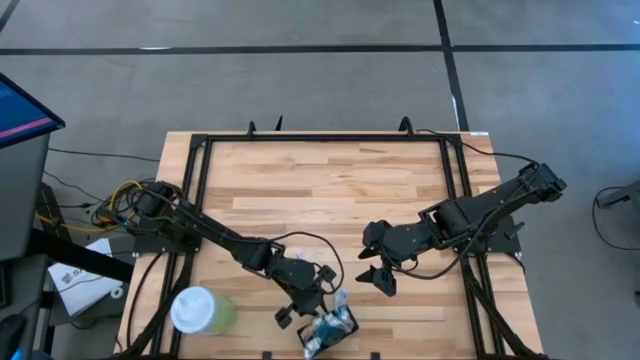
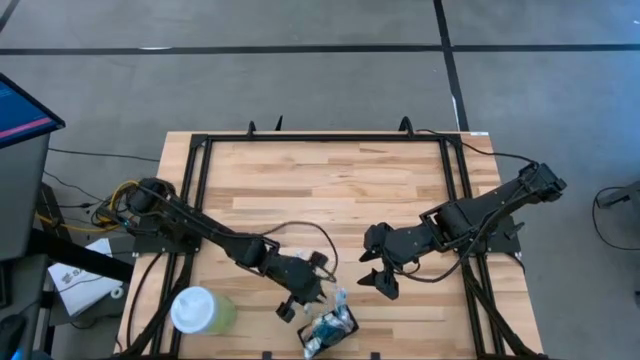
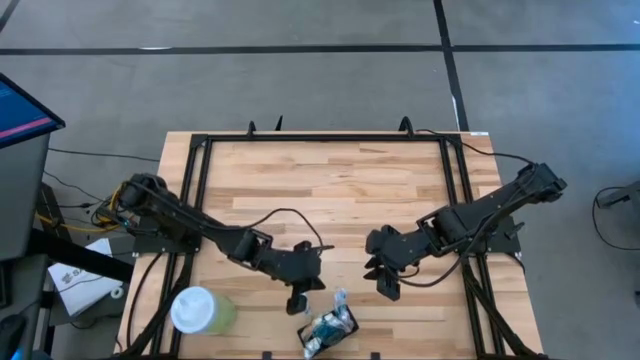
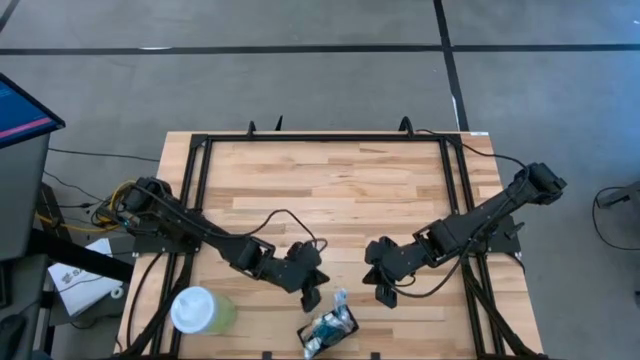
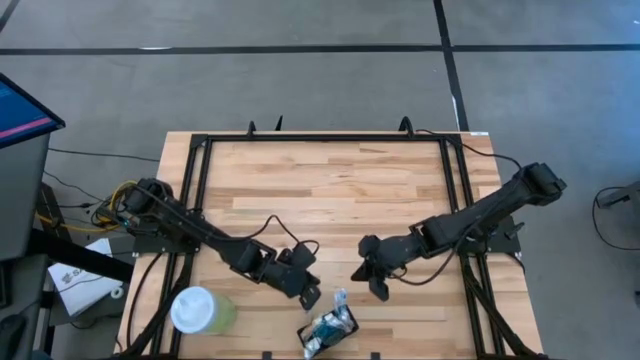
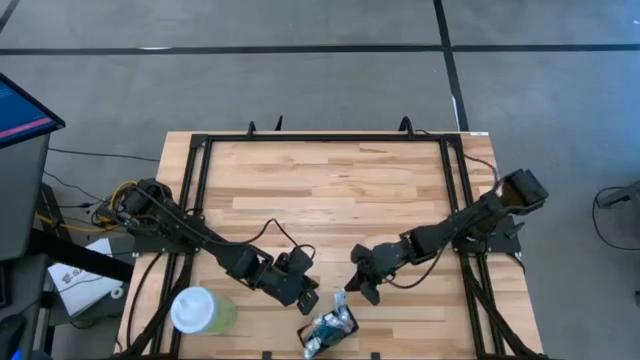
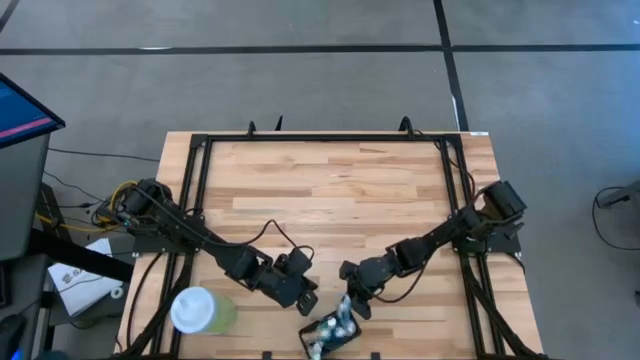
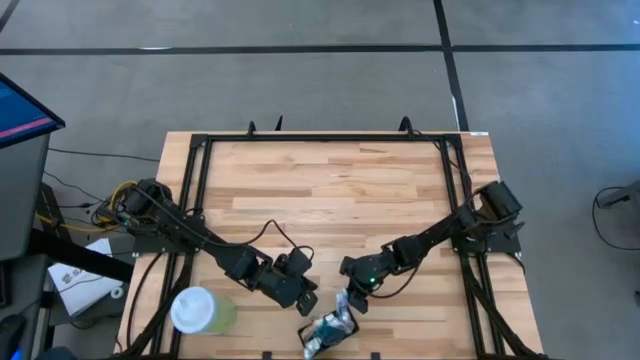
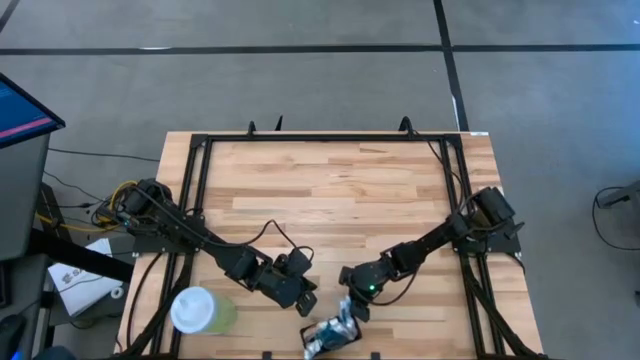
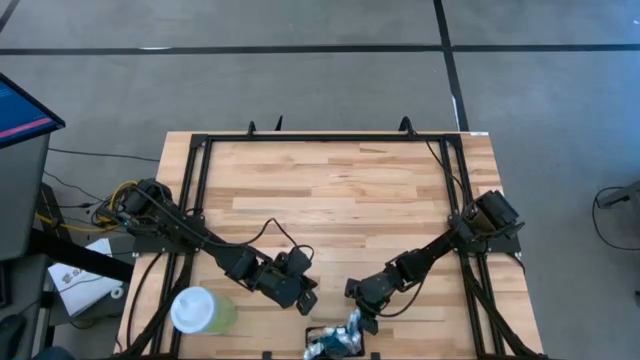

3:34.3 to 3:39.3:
Task: Pick & Place toothbrushing station
Adjust the black wire organizer
